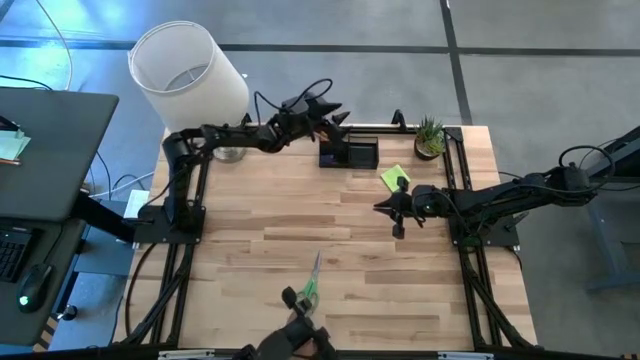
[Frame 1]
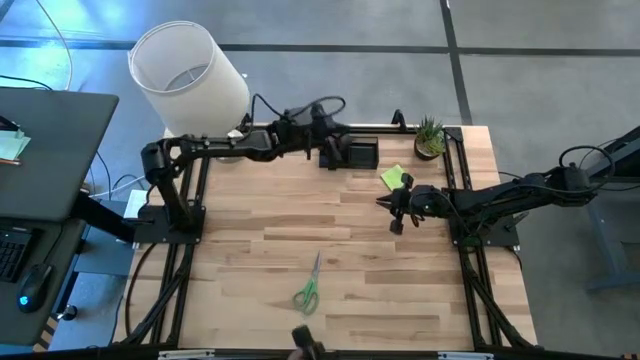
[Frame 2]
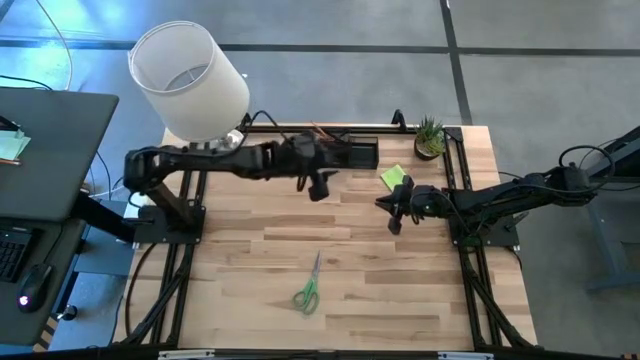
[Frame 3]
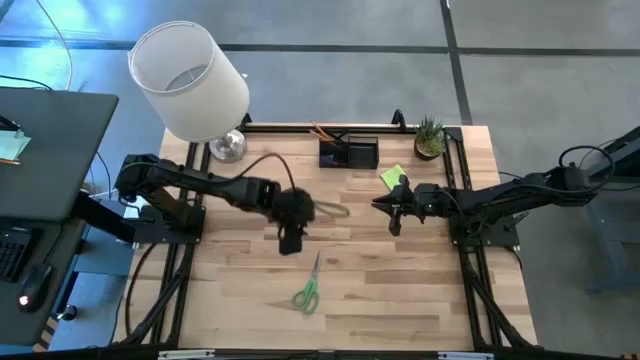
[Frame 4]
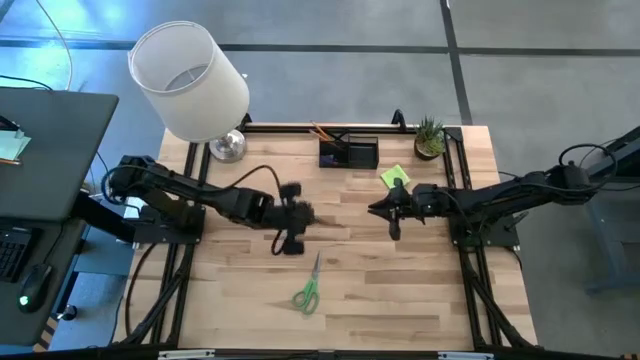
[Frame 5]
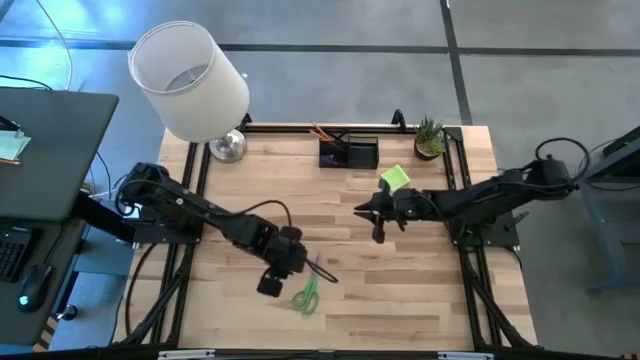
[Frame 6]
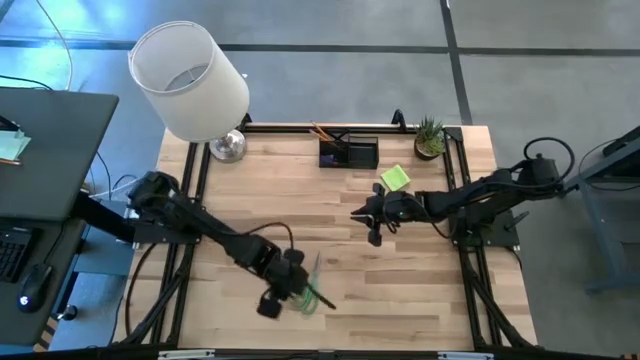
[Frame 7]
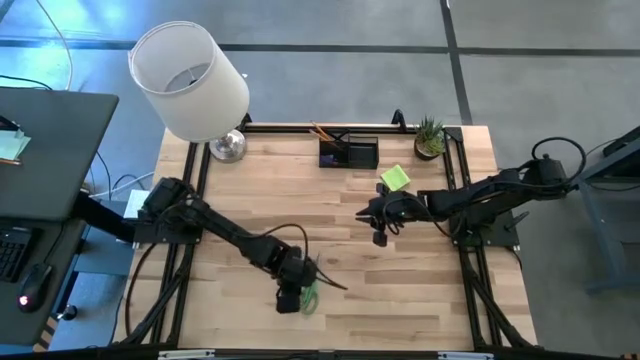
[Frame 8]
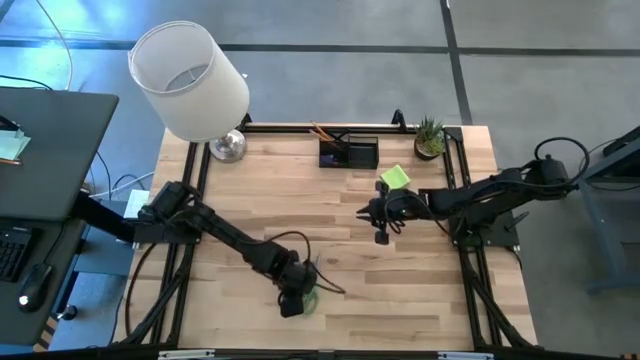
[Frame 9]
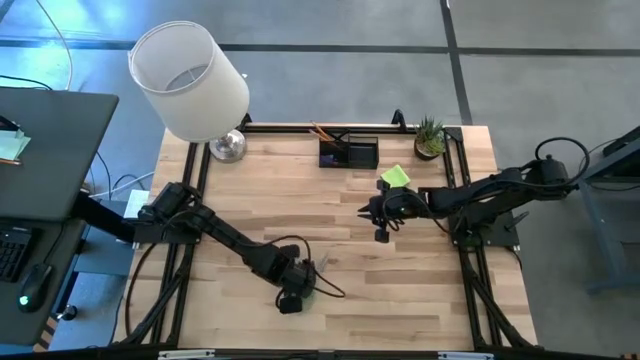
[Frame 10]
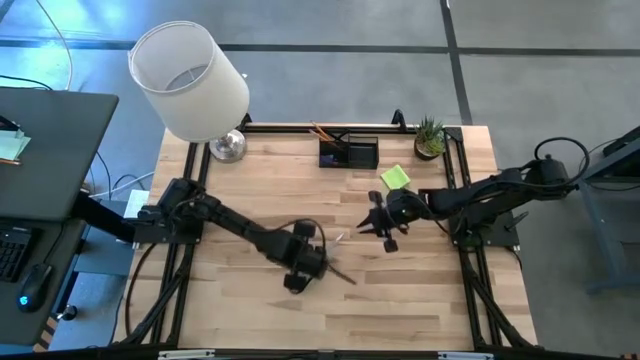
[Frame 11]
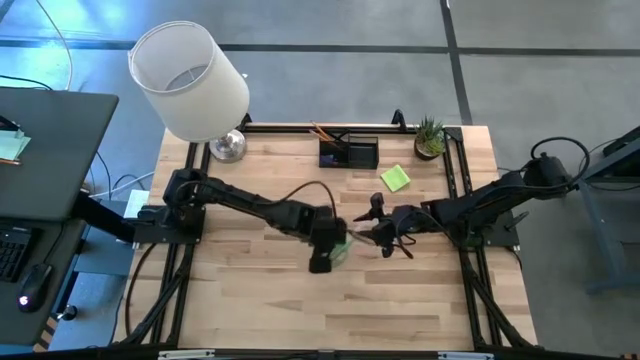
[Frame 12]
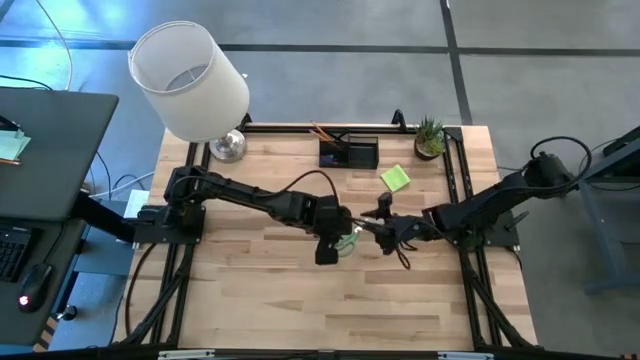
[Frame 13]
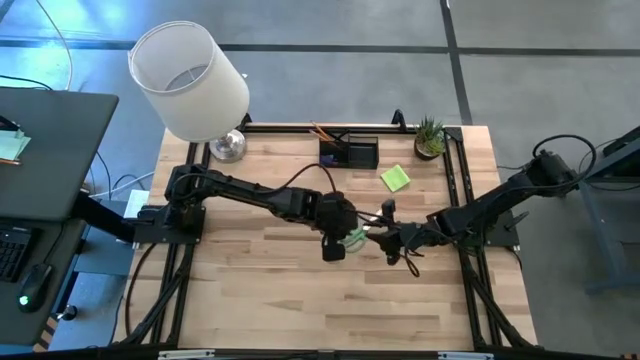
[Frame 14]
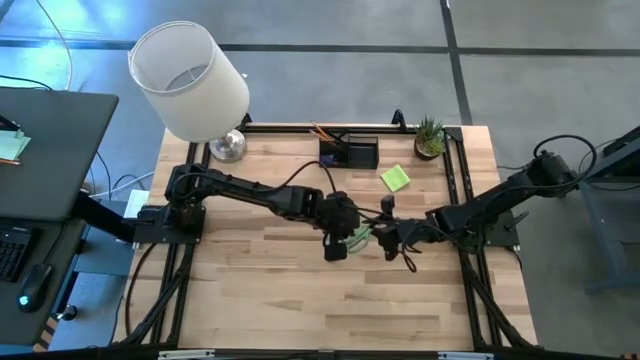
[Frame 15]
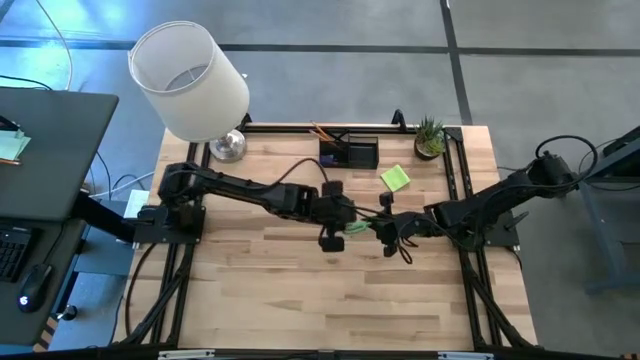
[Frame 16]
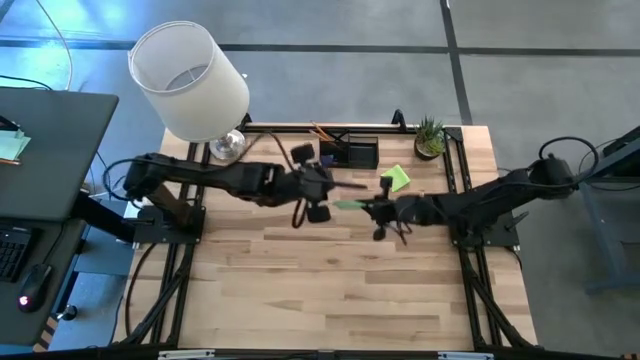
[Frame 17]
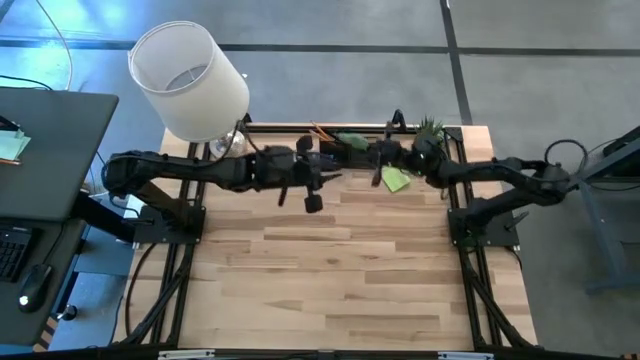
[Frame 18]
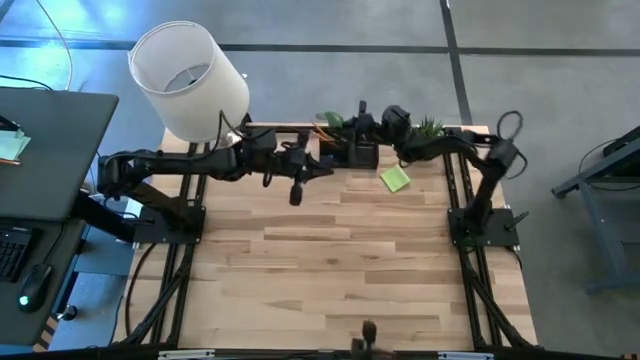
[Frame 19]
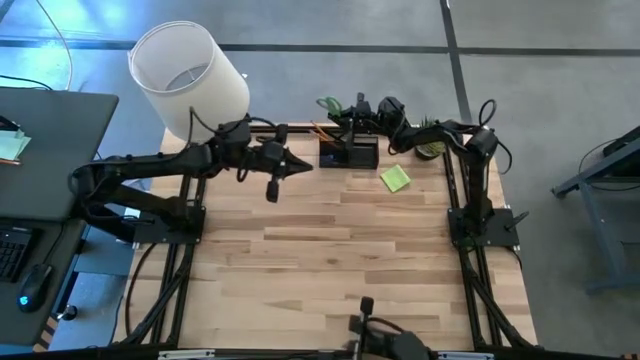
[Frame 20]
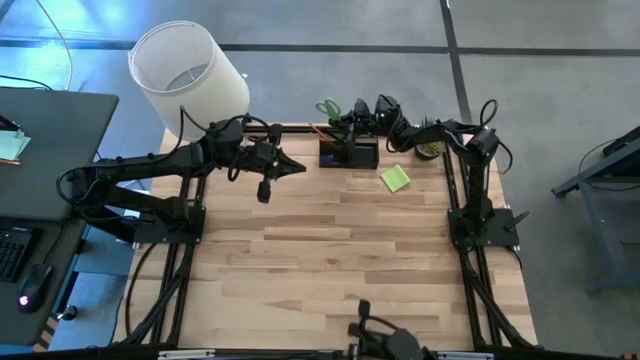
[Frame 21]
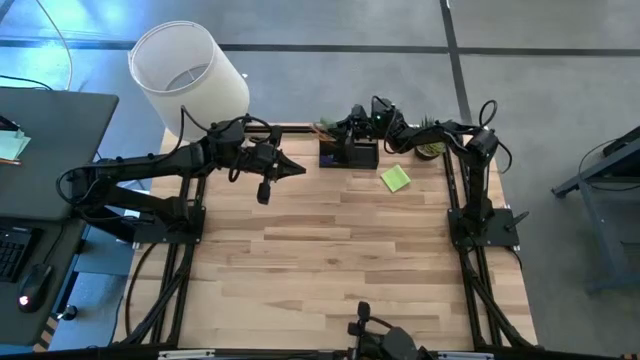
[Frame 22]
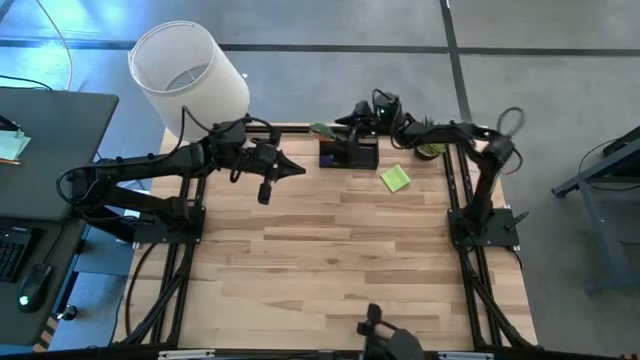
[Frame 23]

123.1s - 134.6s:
Task: Pick and place office supplies into organizer
Put the green scissors into the black desk organizer

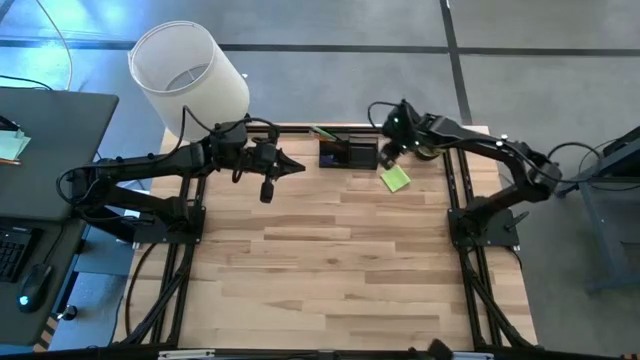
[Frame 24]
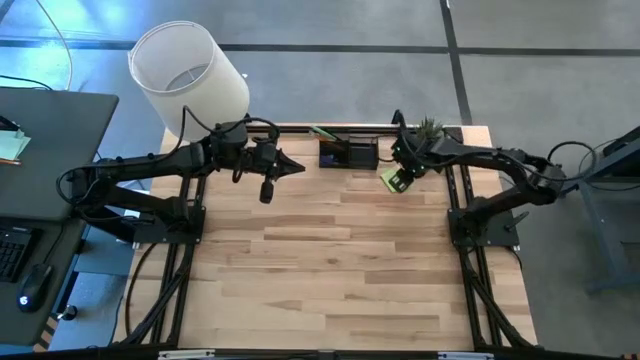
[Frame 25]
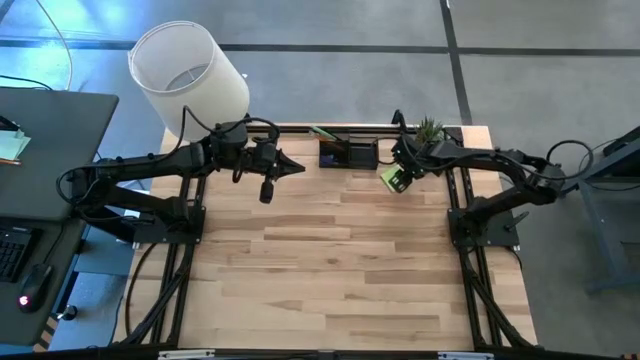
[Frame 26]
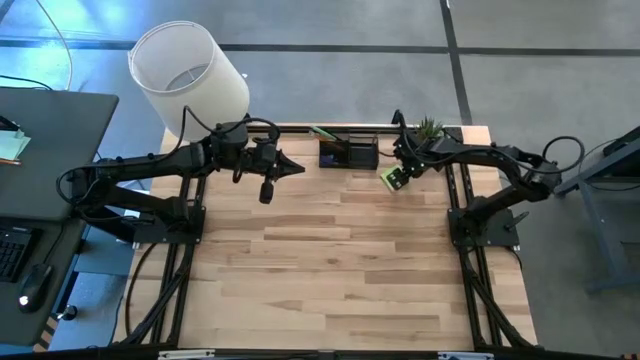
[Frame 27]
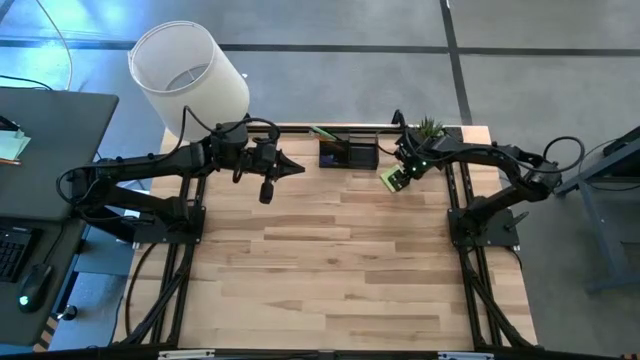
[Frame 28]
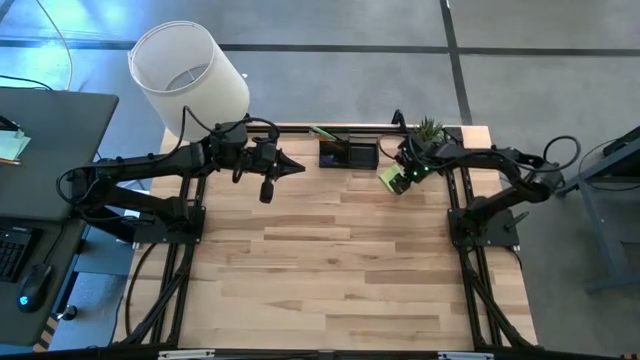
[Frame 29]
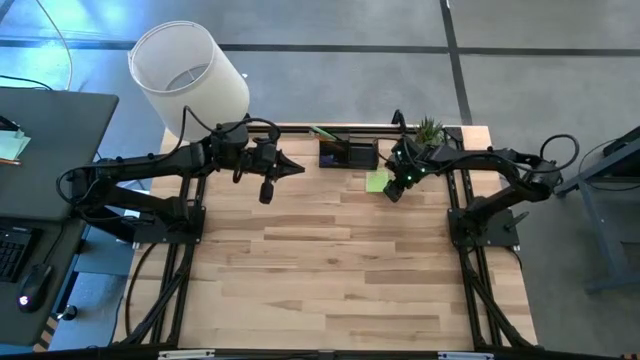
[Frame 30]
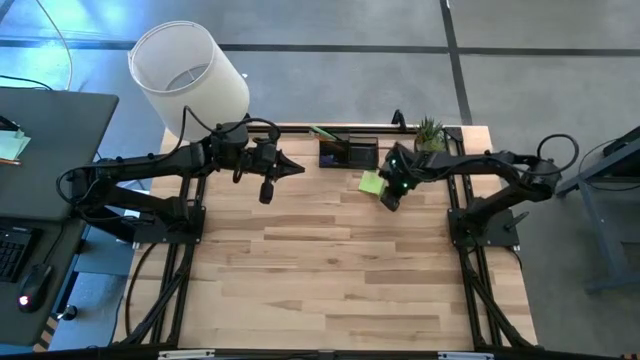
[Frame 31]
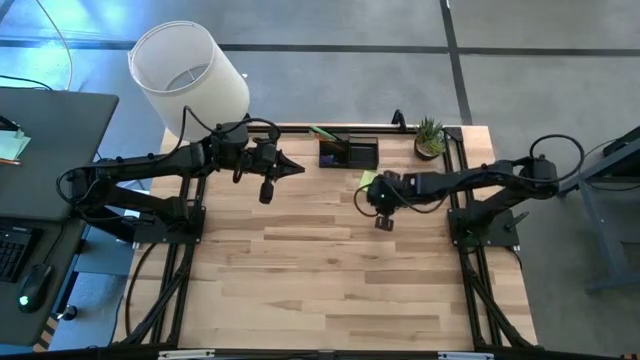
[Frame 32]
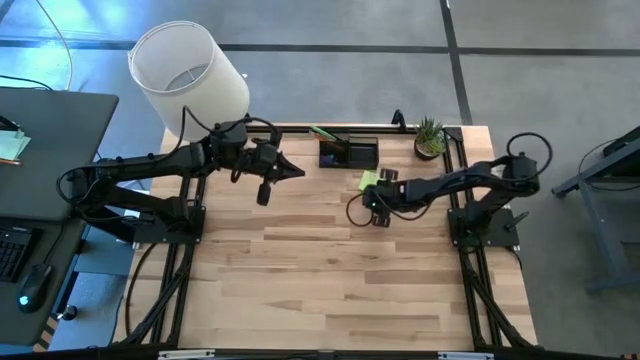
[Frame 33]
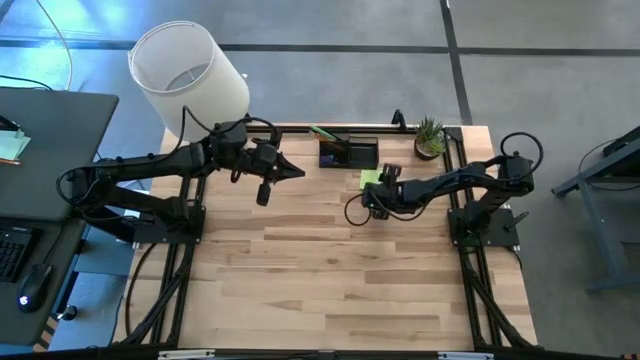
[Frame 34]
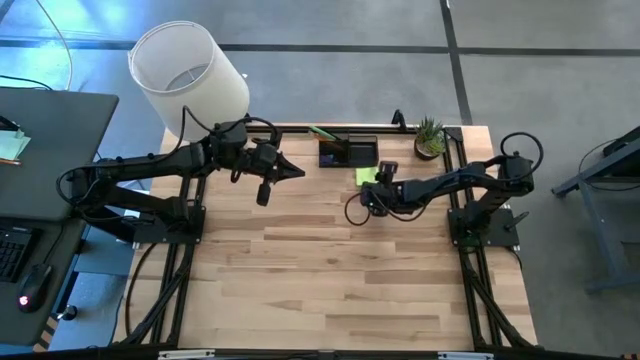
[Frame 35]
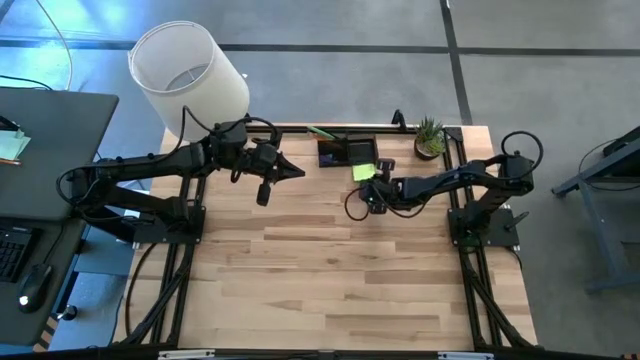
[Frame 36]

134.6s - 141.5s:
Put the green sticky notes into the black desk organizer

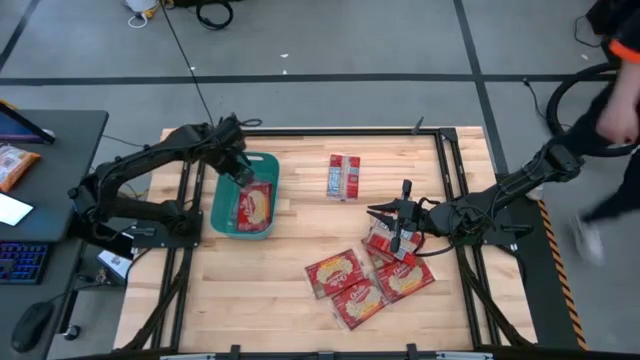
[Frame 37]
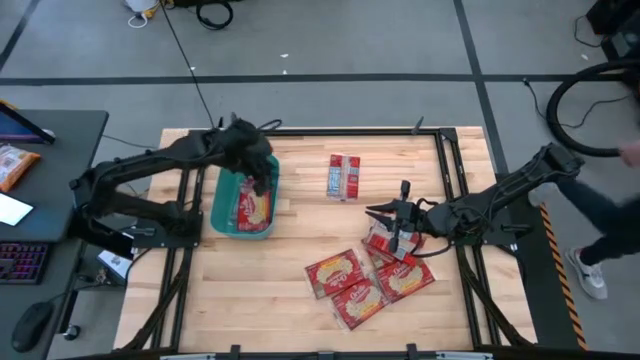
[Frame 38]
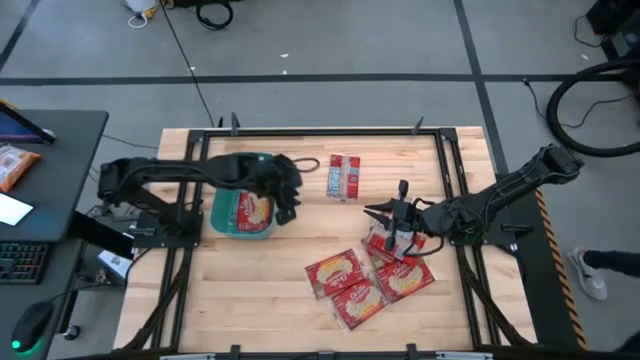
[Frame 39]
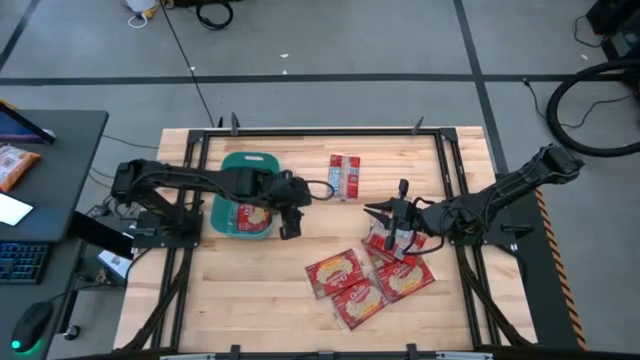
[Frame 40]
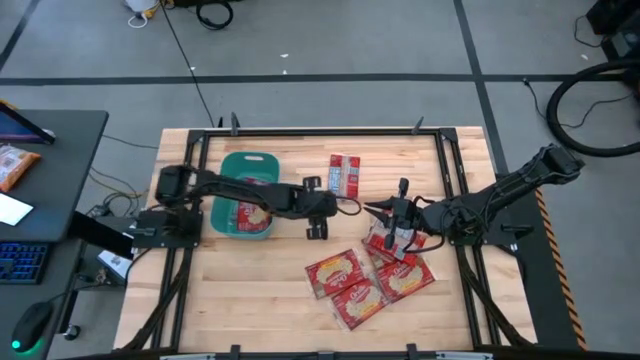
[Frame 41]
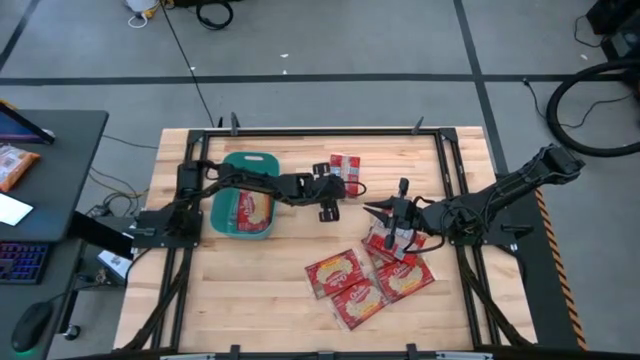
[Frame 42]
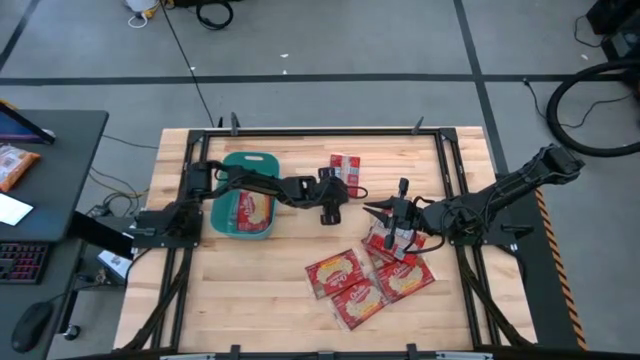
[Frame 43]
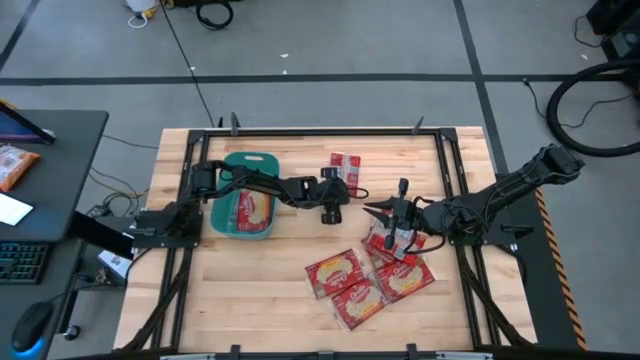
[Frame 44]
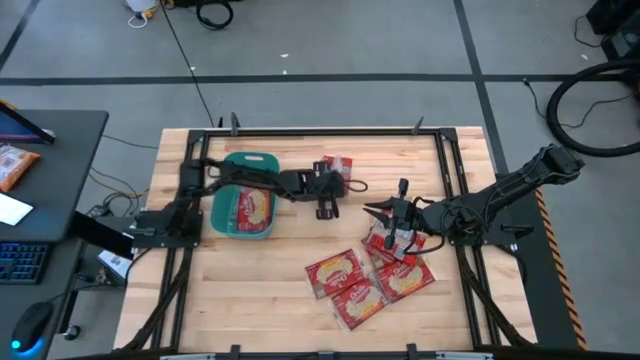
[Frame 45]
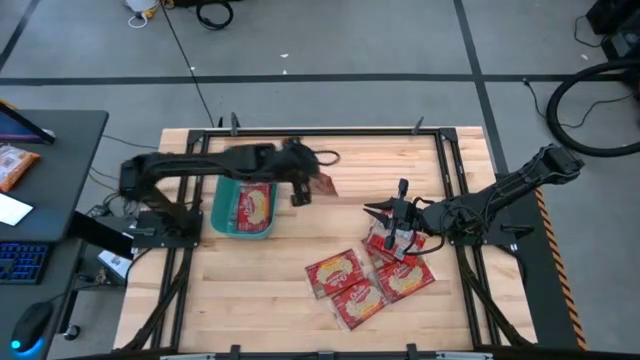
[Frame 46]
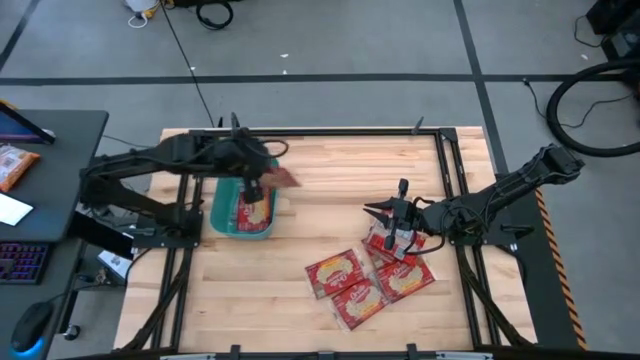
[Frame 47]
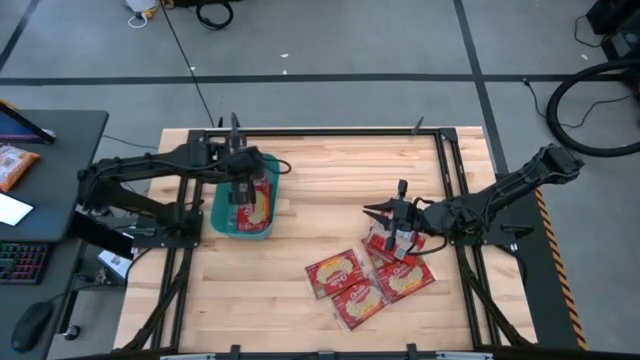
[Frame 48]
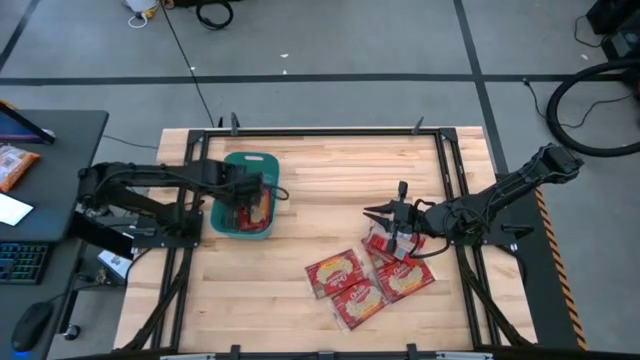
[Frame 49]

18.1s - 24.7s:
Task: Sort popcorn bags into baskets
Put the red popcorn bag into the green bin
